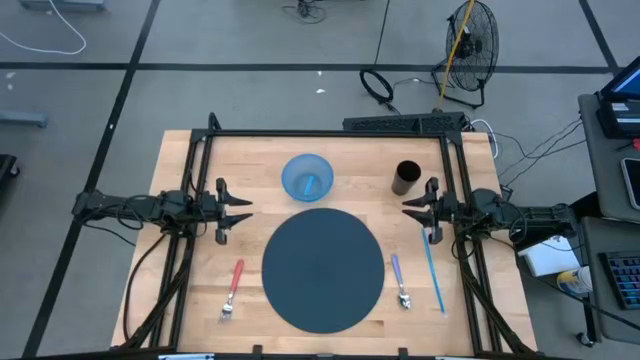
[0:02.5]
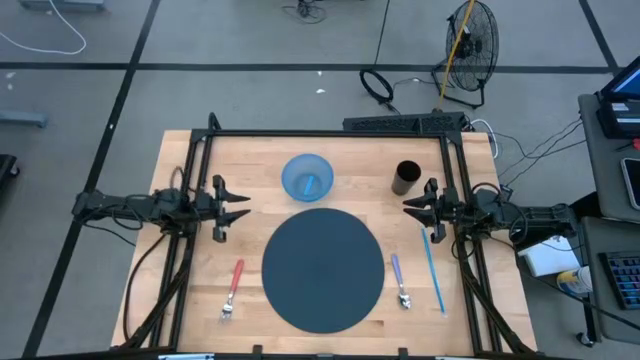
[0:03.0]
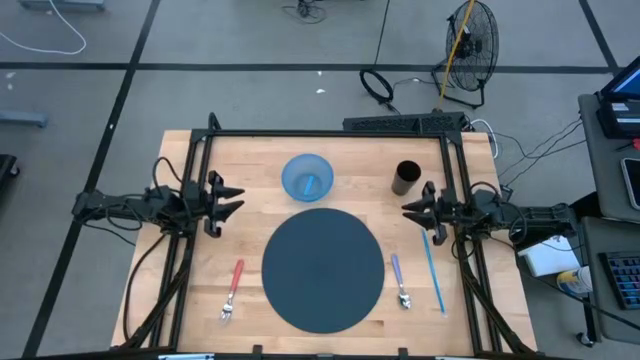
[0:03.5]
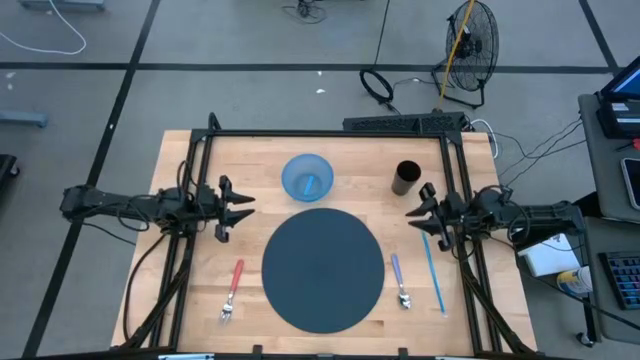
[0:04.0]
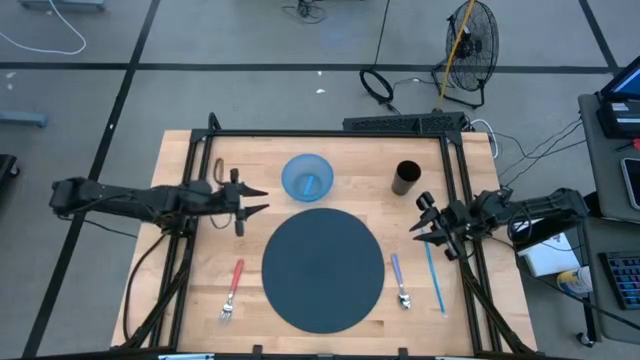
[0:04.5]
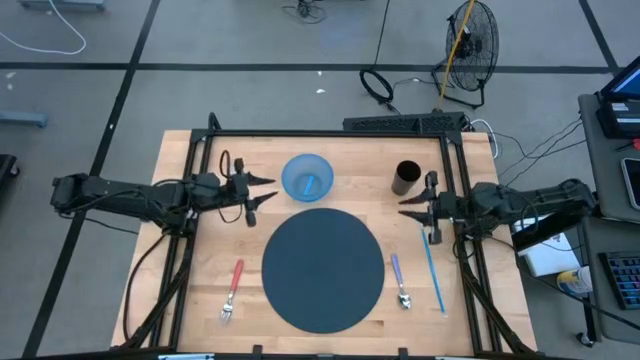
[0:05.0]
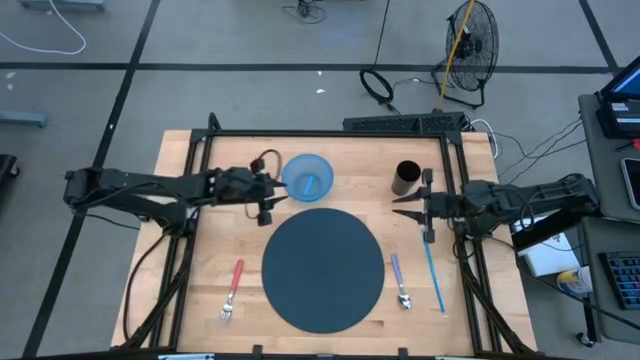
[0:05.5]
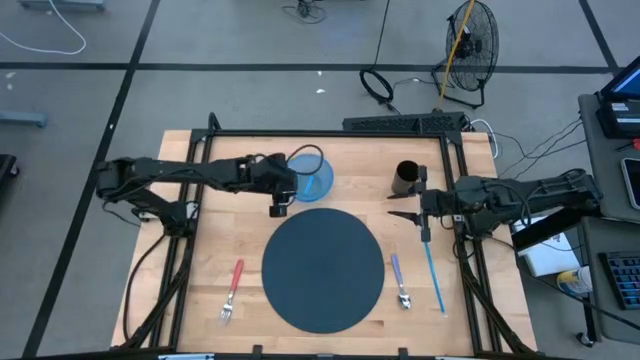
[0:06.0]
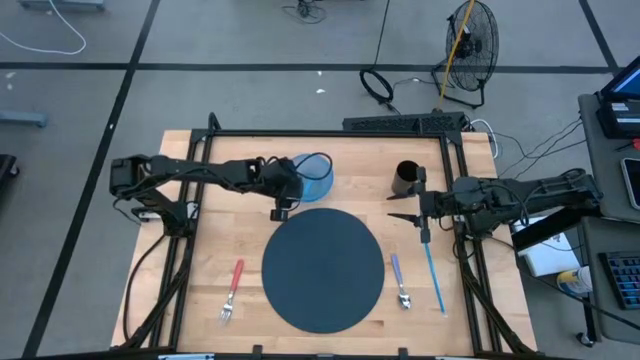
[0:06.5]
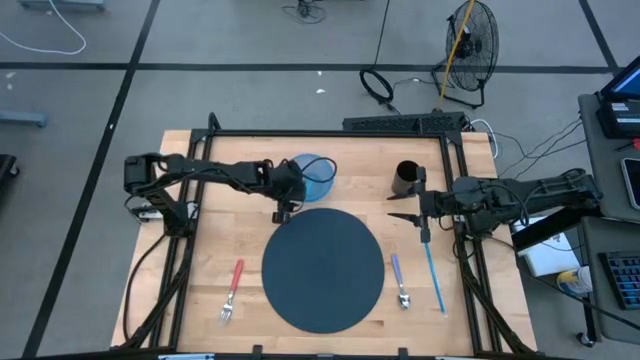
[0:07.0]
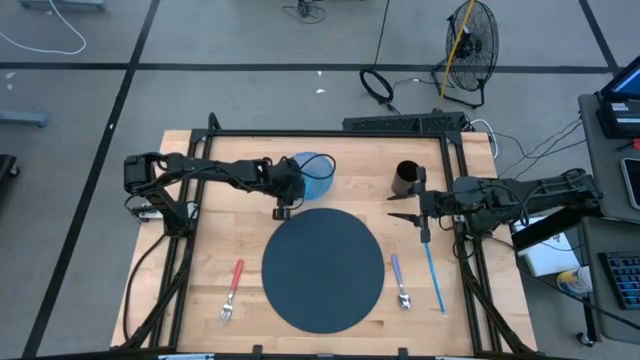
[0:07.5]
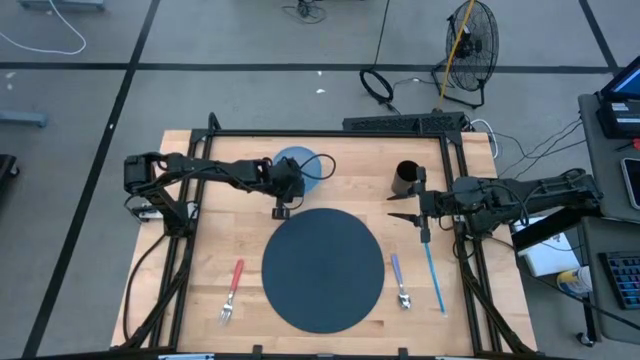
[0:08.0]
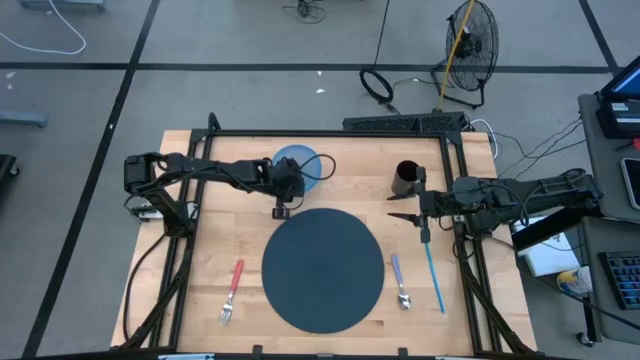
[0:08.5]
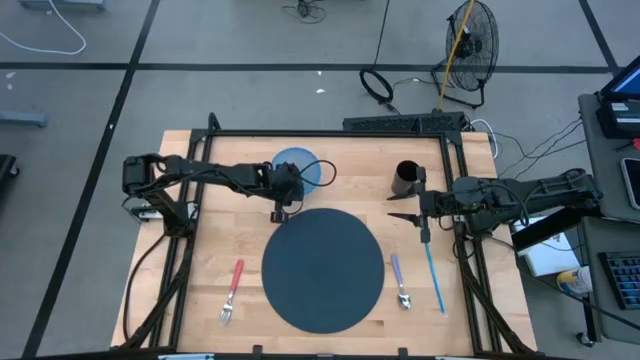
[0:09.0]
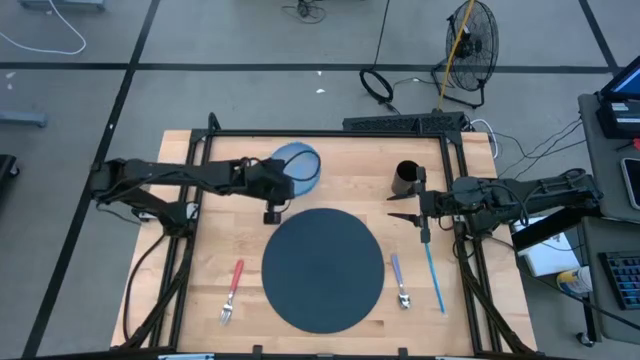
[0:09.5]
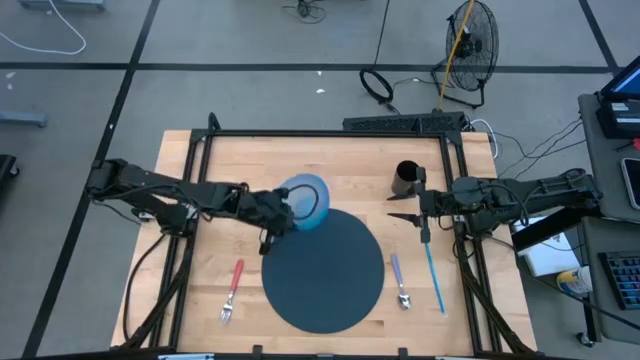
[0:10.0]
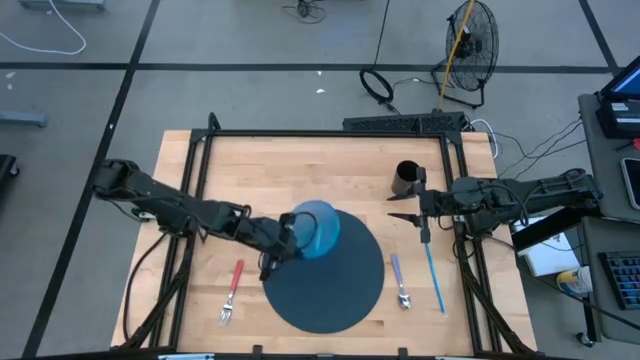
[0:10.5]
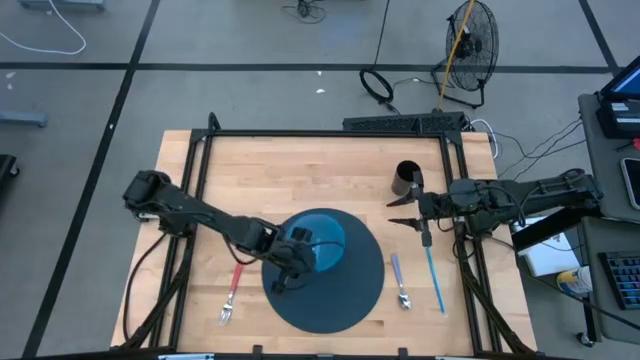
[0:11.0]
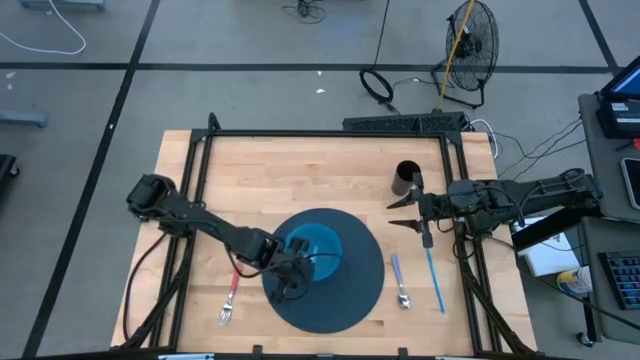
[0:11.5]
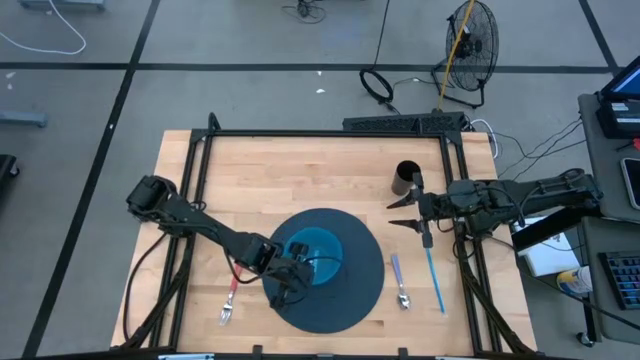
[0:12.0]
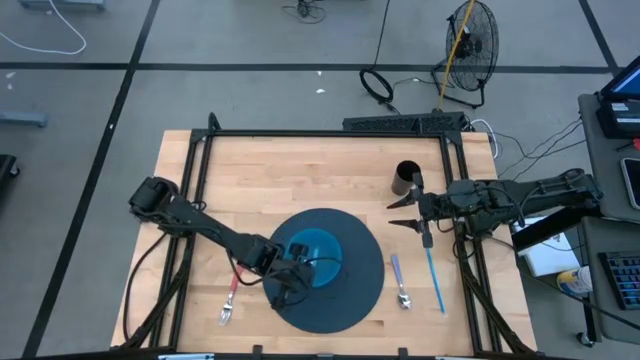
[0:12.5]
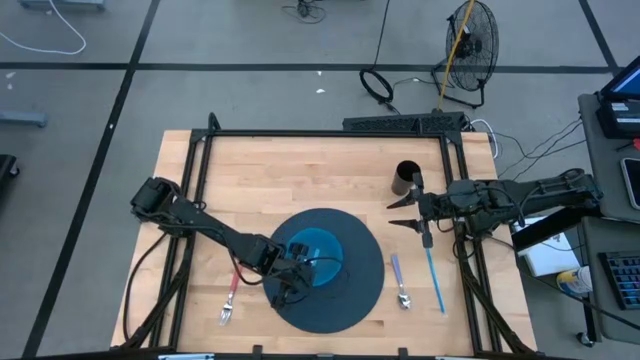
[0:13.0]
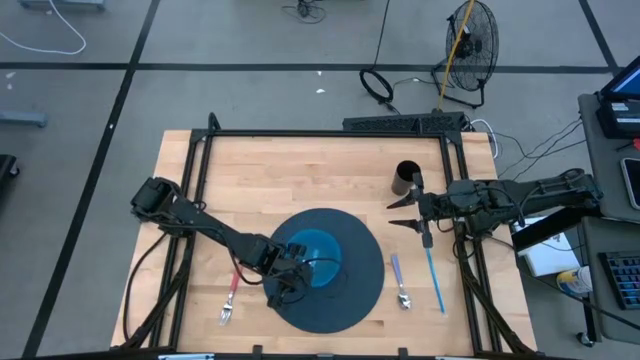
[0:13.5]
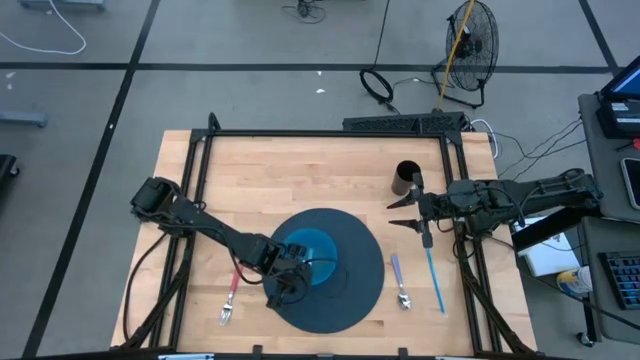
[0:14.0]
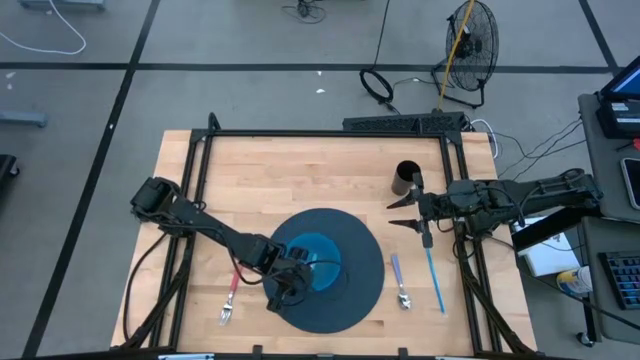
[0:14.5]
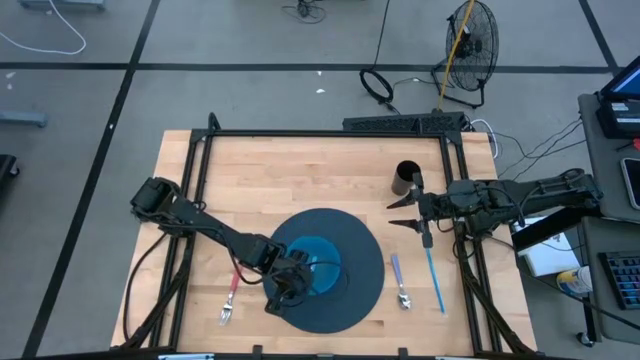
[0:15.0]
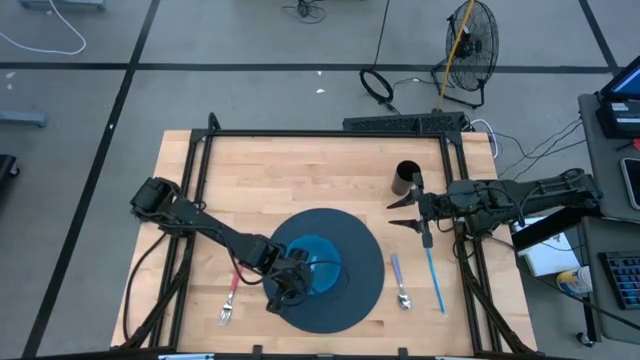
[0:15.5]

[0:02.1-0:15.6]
Task: Pick & Place Utensil
Put the blue bowl on the blue mat

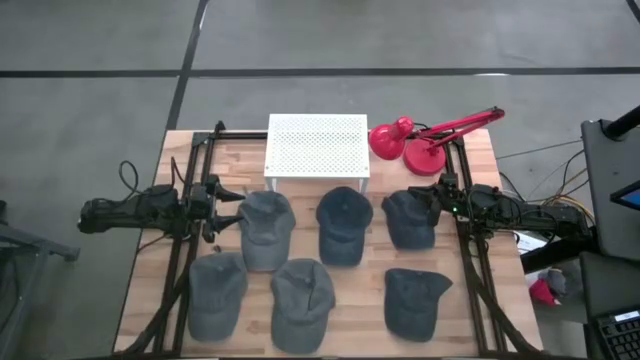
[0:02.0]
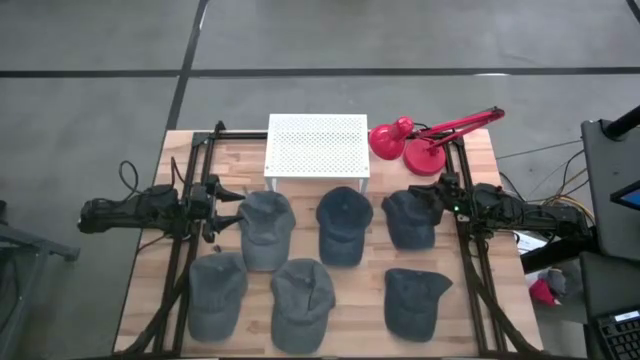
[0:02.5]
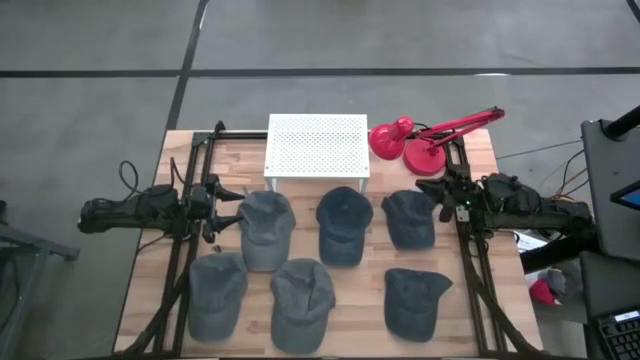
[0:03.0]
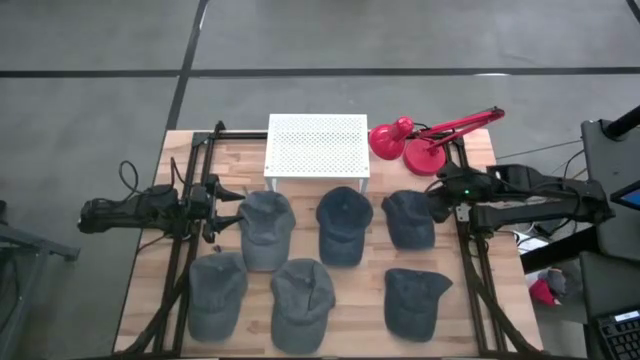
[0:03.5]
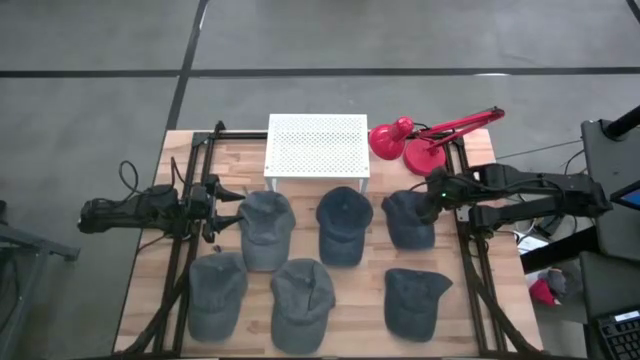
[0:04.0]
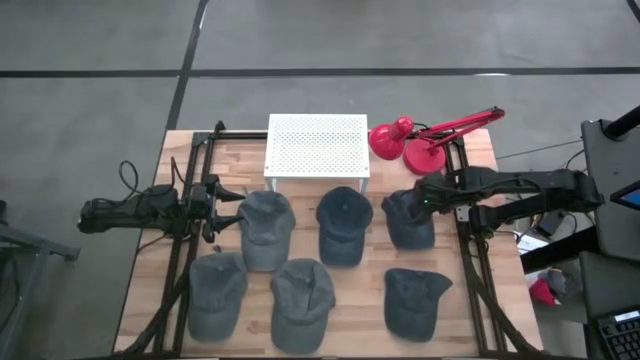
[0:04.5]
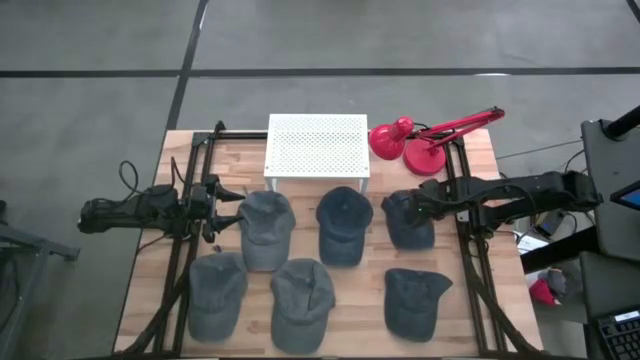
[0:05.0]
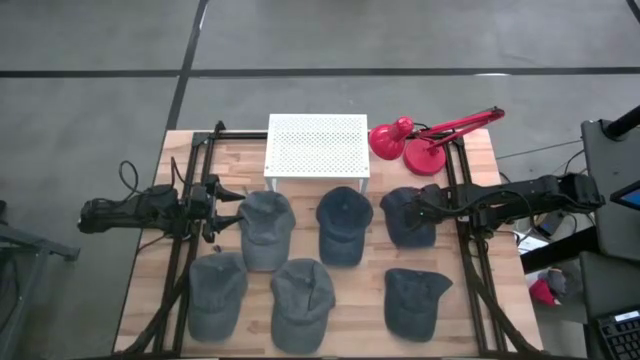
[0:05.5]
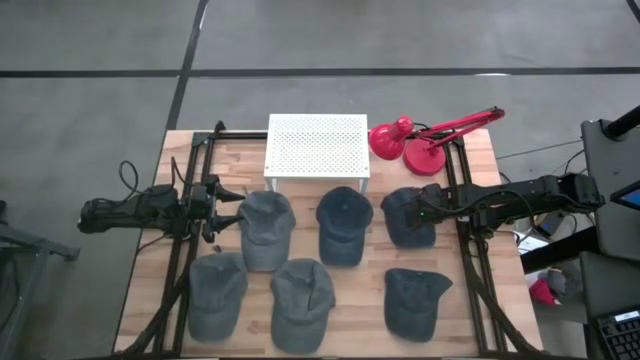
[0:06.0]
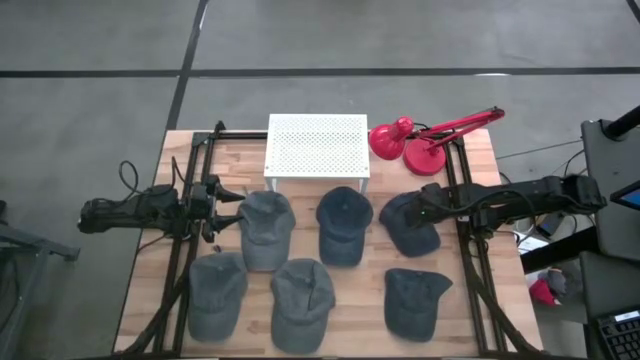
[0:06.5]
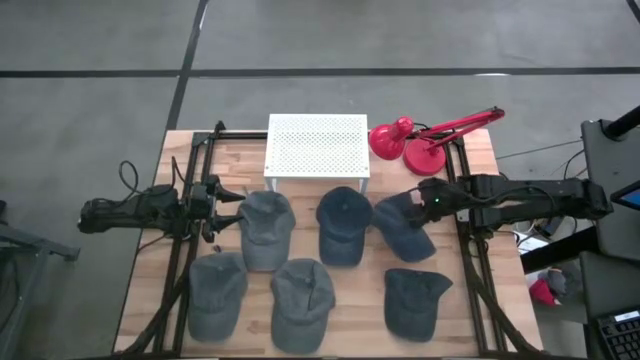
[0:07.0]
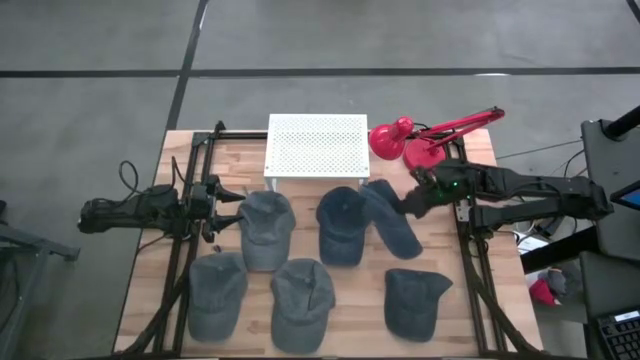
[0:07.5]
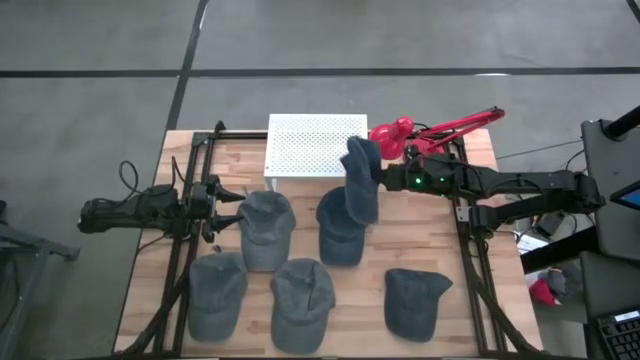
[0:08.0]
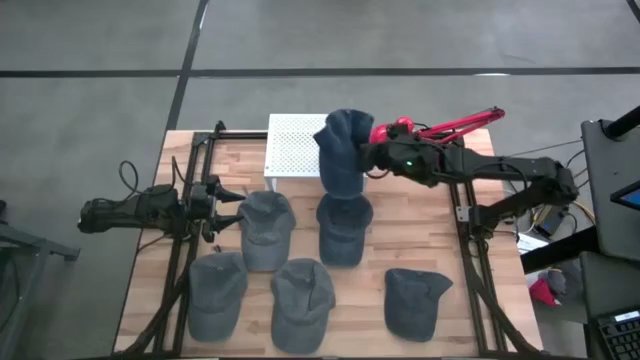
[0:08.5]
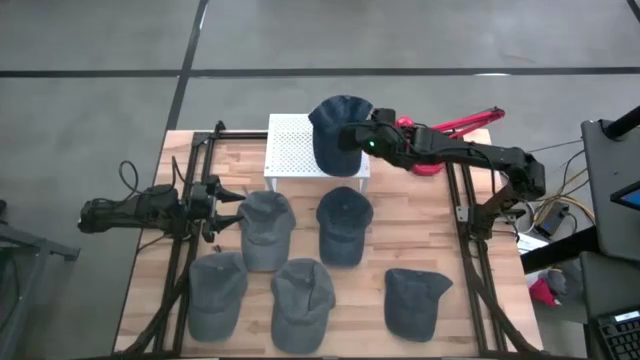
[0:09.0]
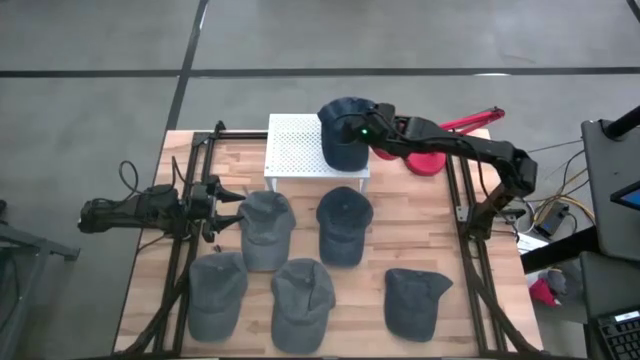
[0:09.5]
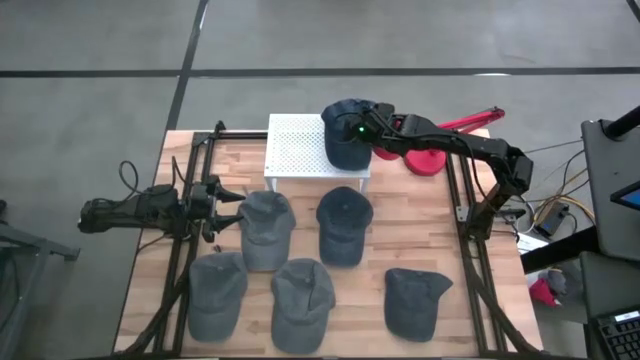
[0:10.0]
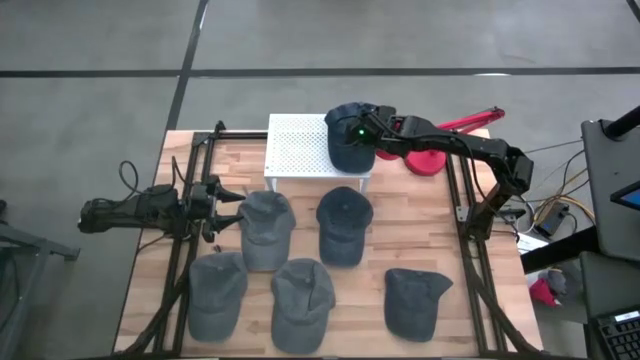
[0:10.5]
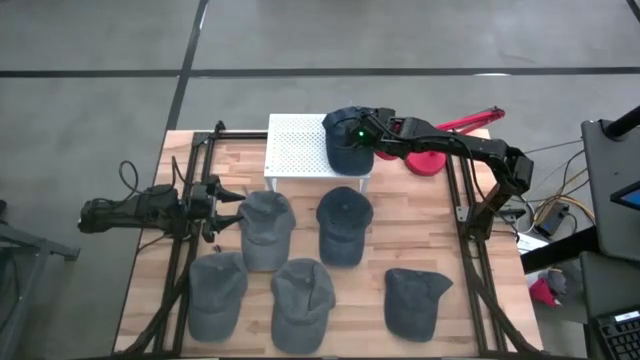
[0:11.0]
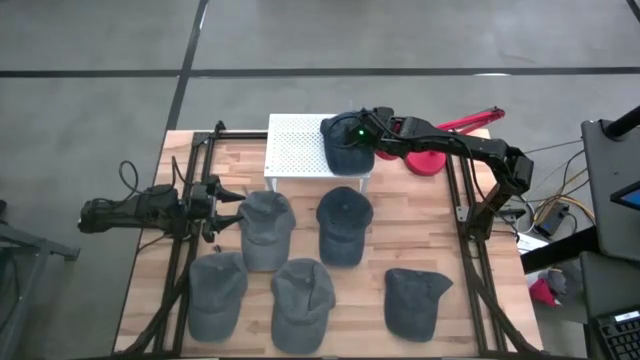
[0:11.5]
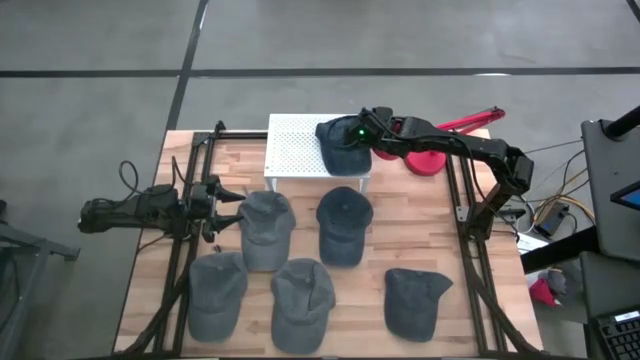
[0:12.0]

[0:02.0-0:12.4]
Task: Pick & Place hat
Put the top right dark blue cap on the shelf
